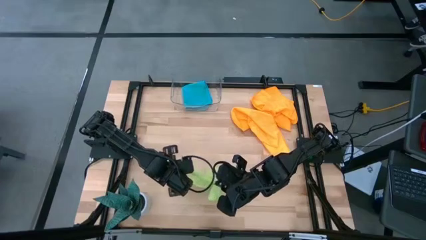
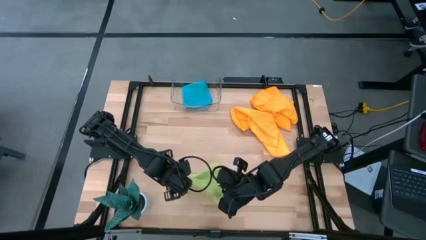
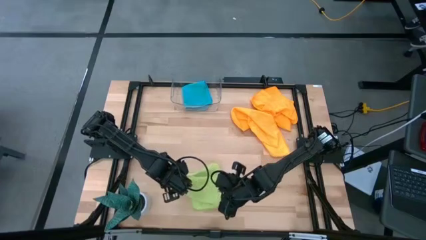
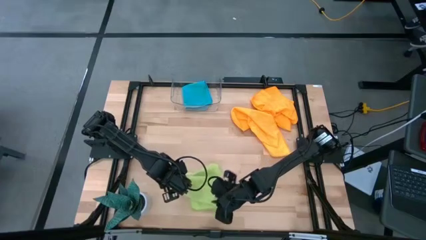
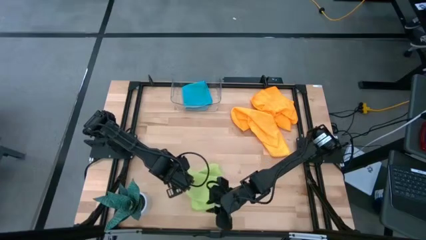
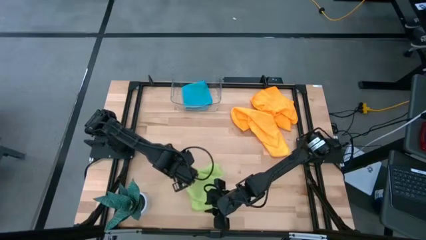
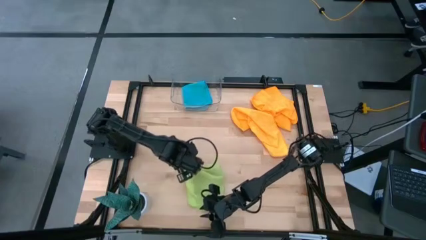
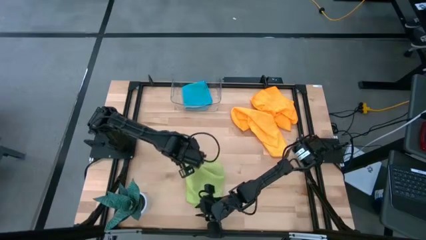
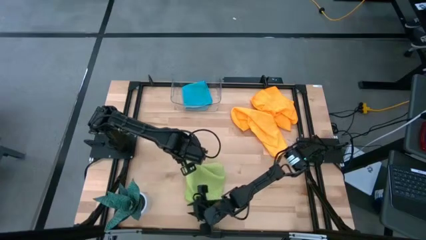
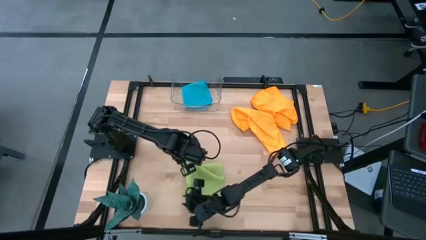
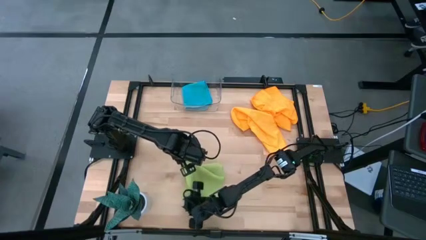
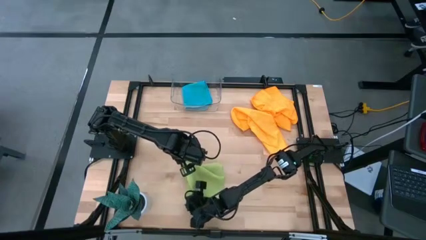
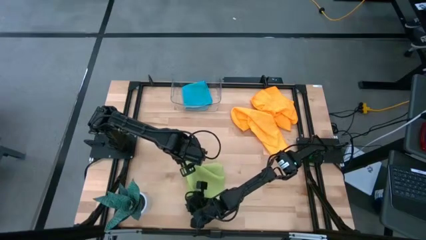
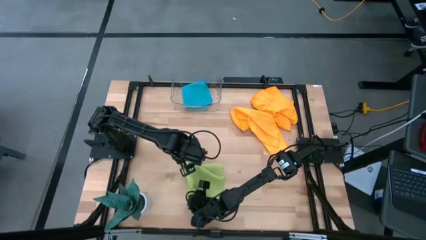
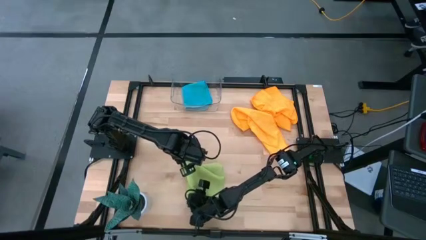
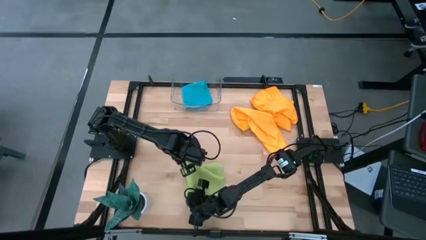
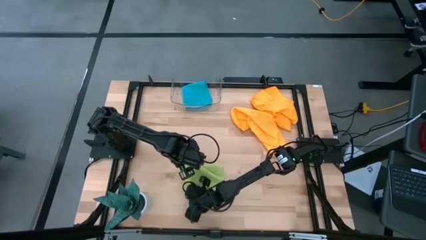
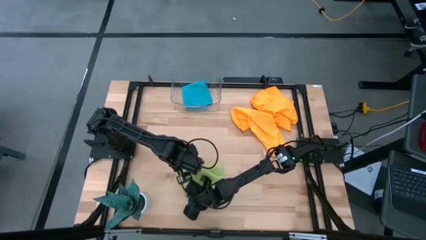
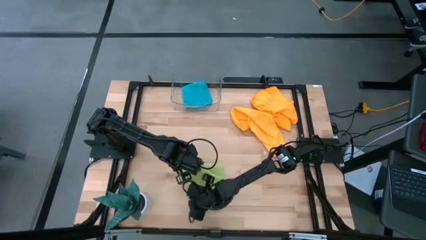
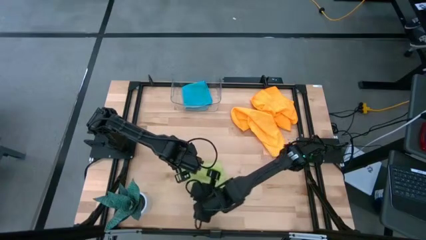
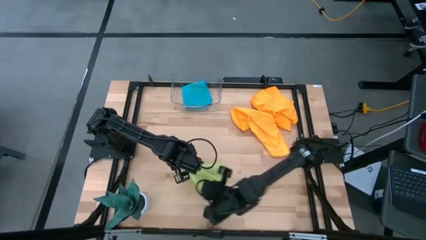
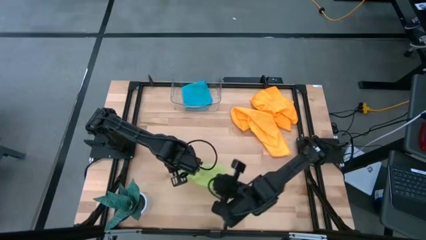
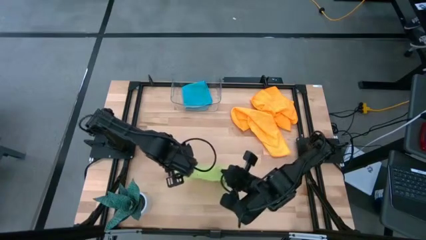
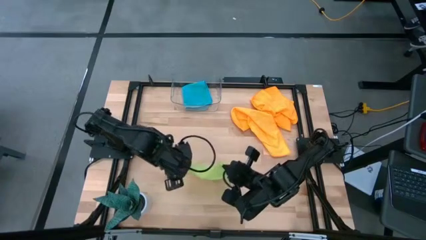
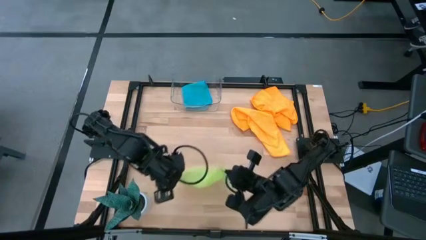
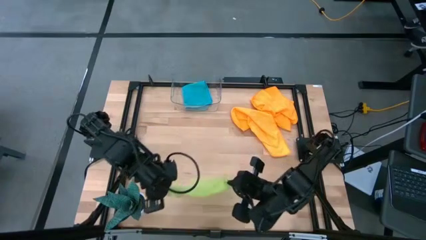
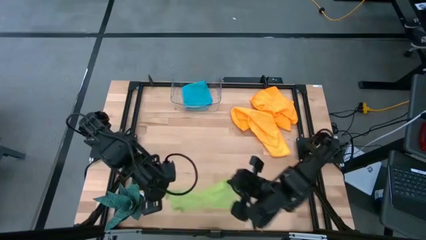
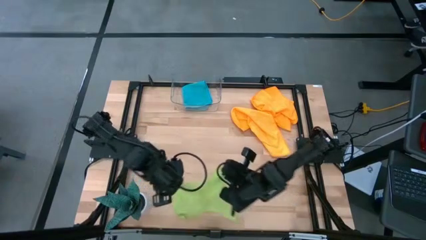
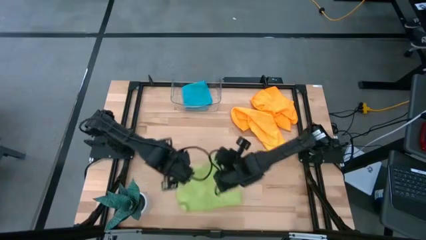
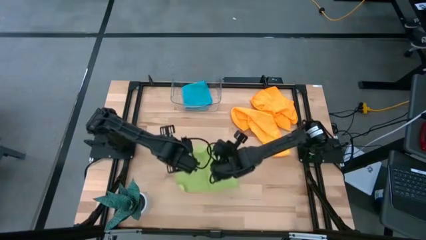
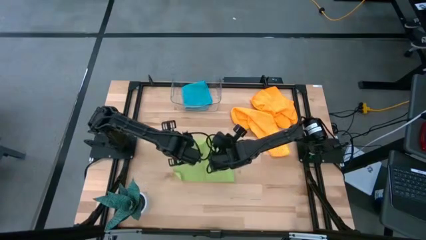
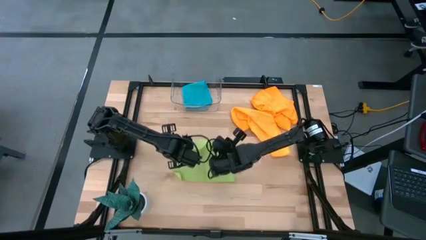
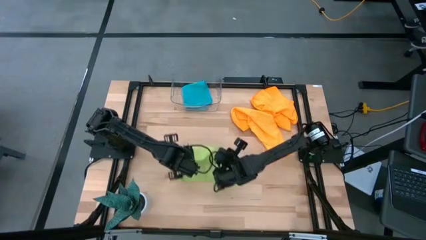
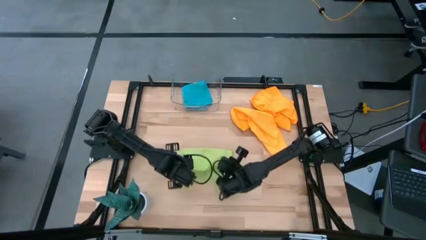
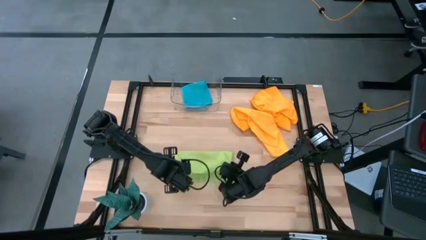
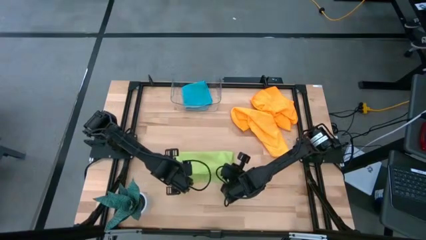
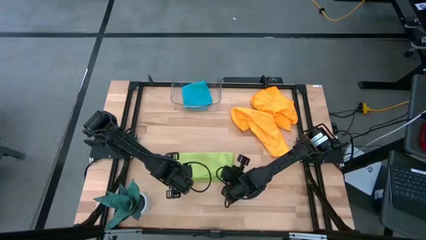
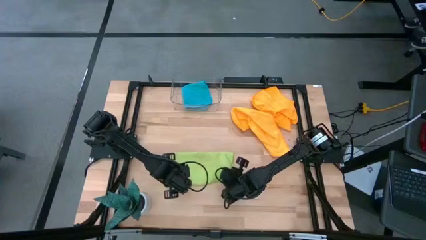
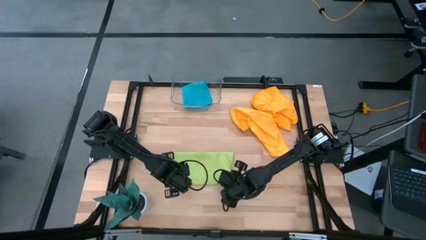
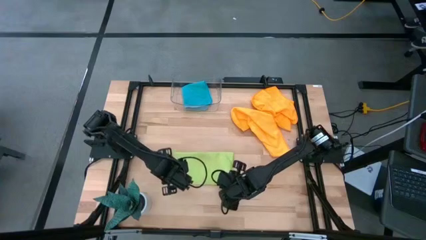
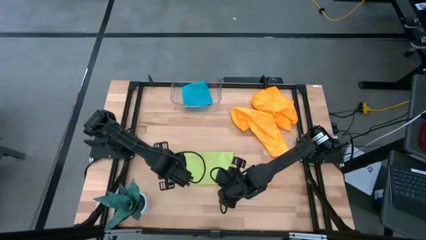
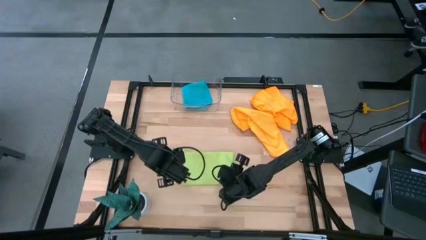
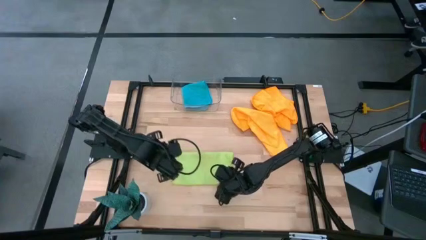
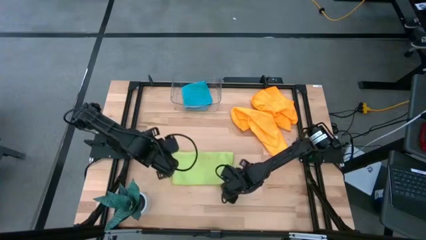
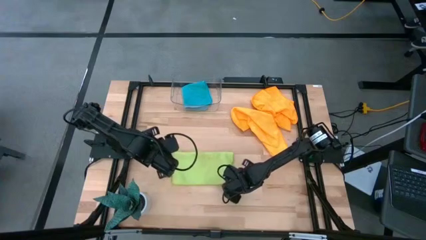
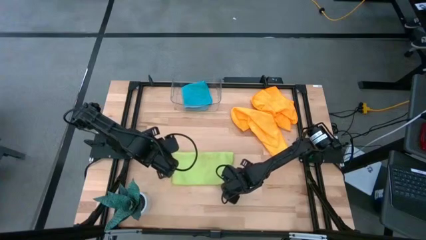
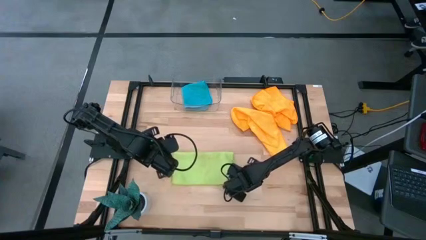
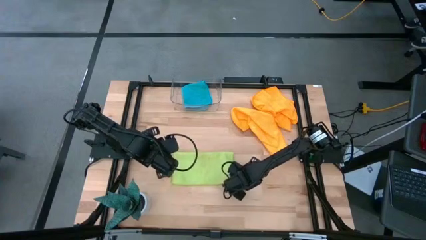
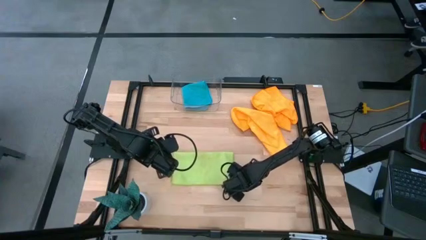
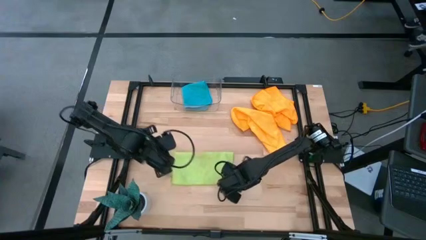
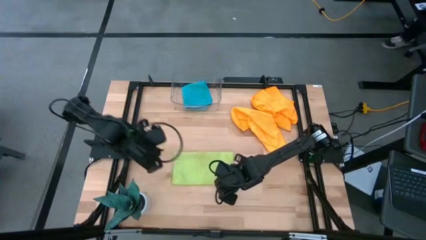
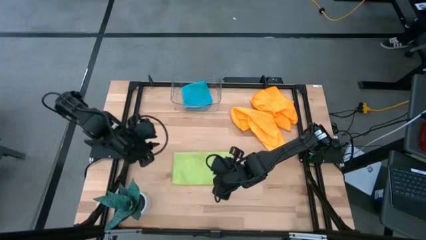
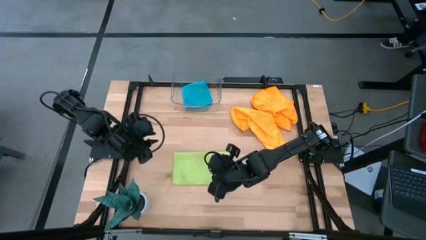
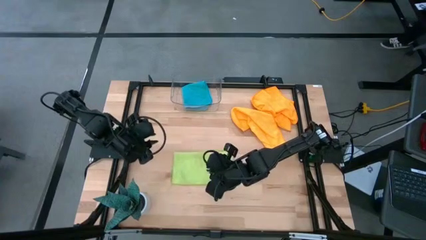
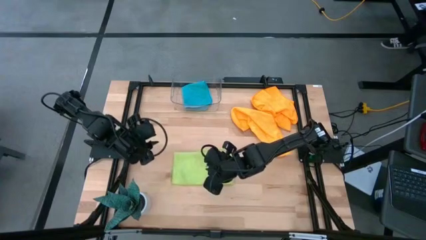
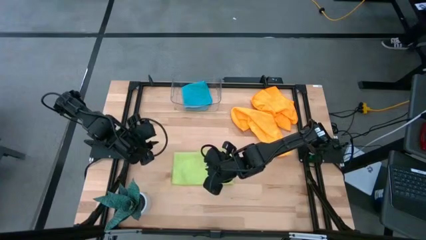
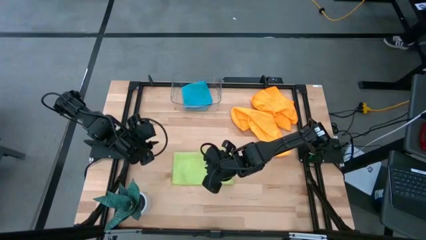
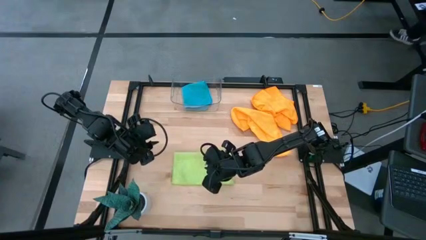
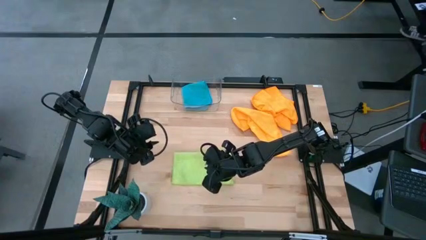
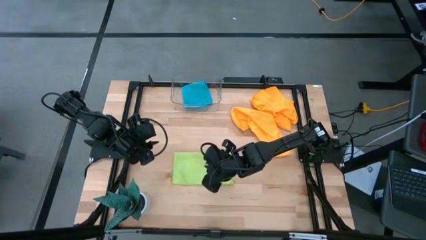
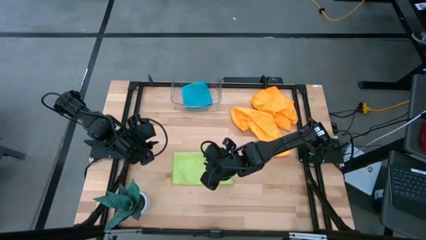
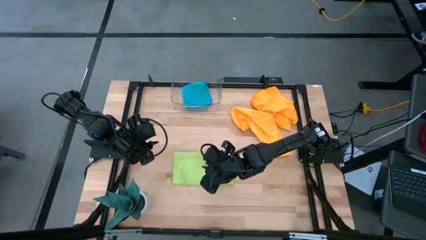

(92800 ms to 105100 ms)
Task: Fold microfiber towels
Fold the green microfiber towel

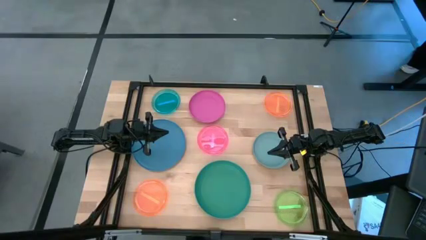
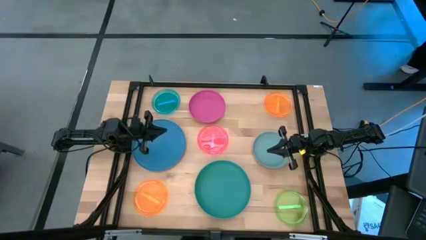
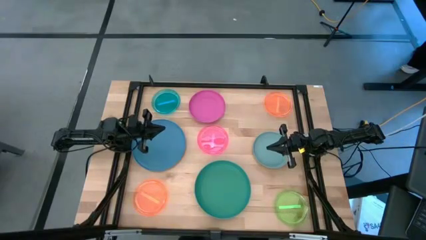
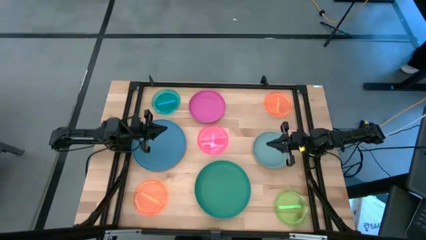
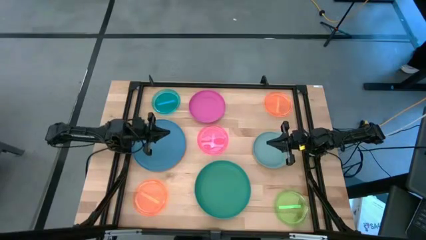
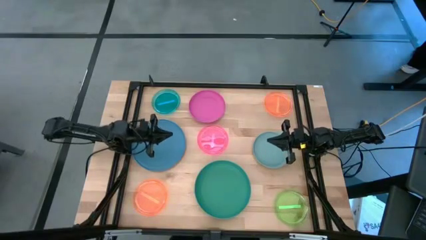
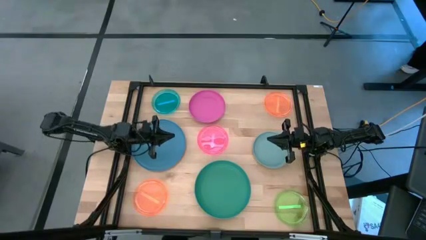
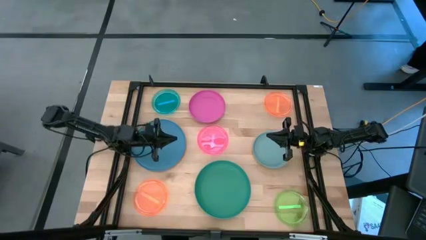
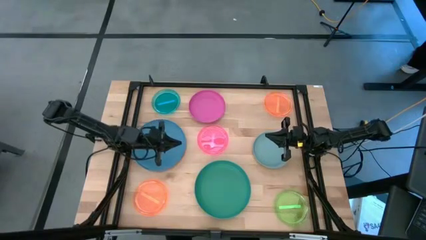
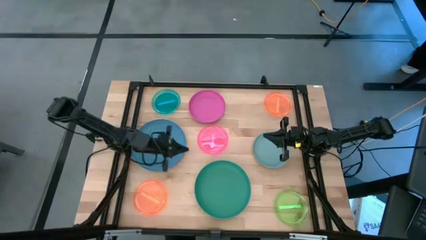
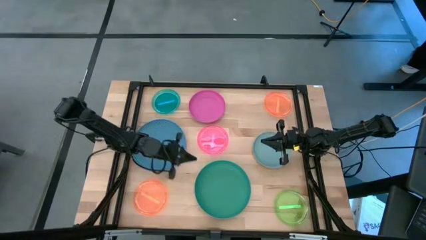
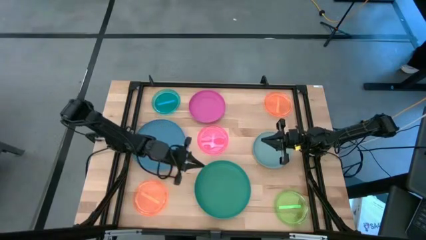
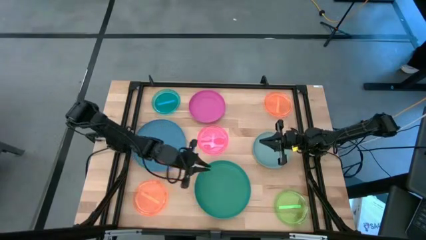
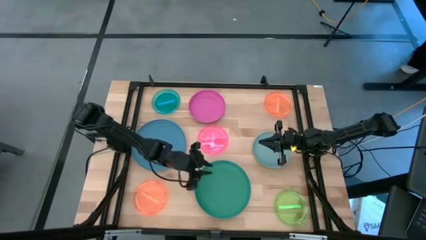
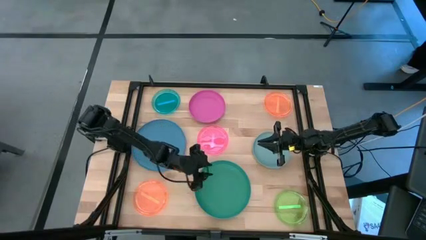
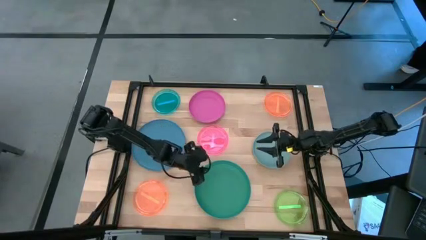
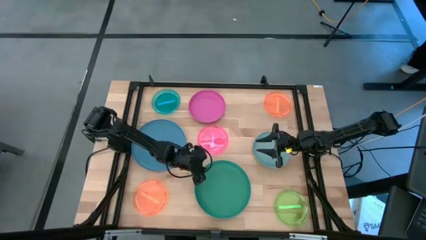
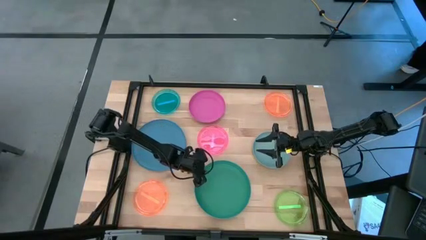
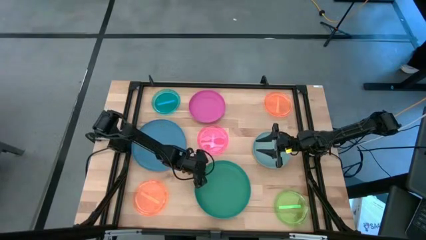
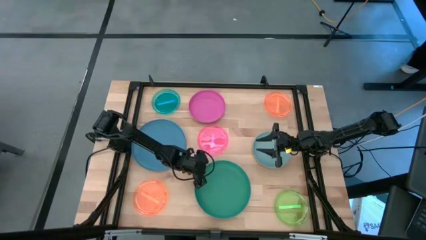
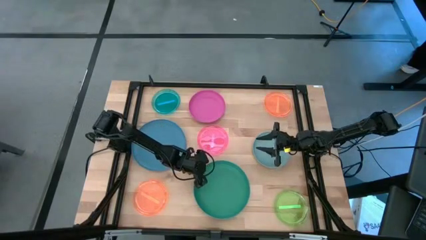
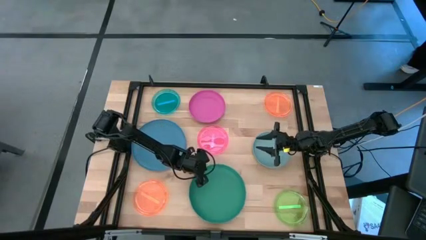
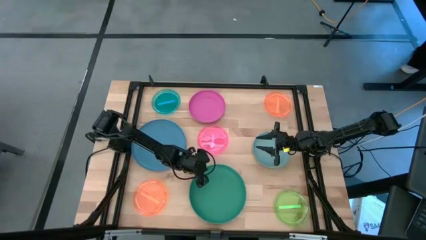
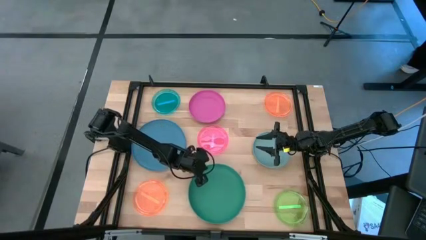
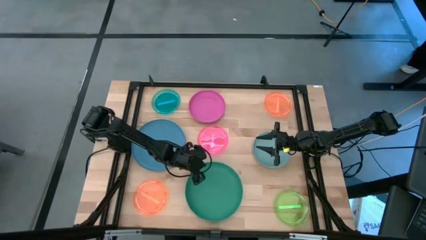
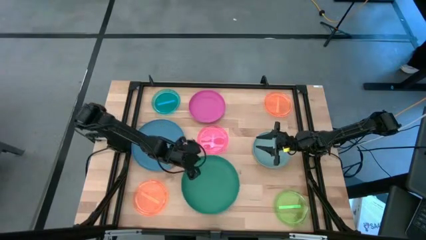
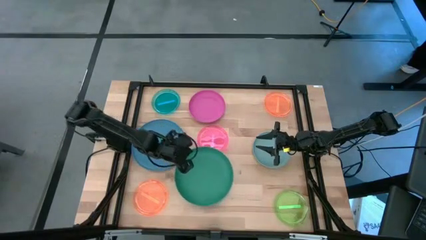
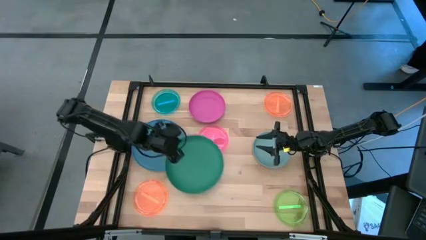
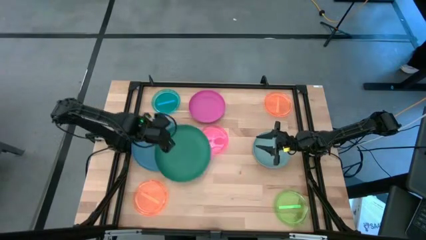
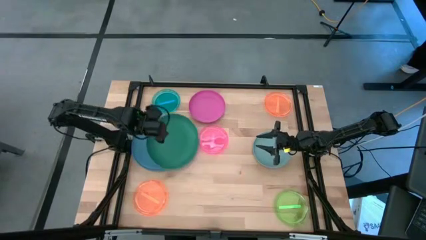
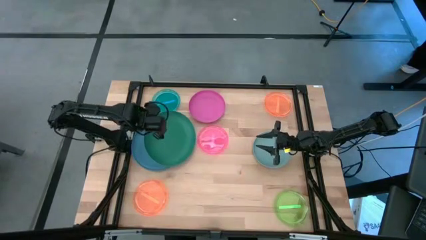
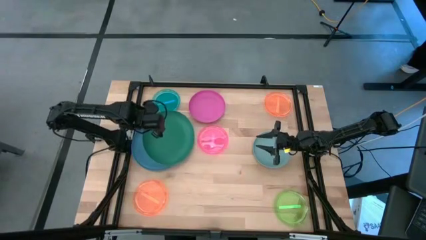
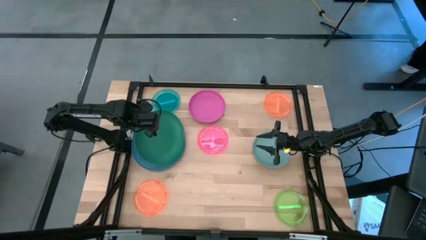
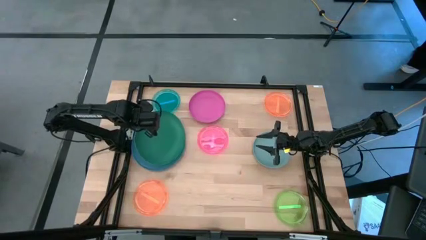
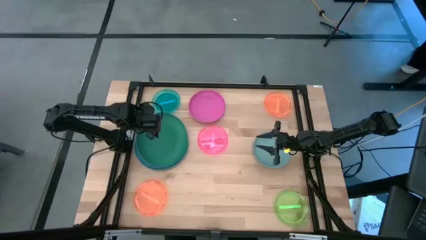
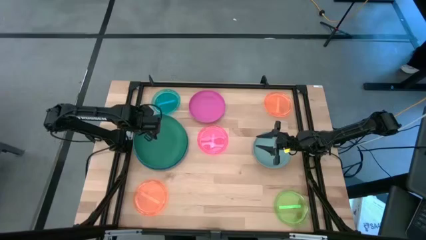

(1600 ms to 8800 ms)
Task: Stack plastic plates
Stack the green plate on top of the dark blue plate
